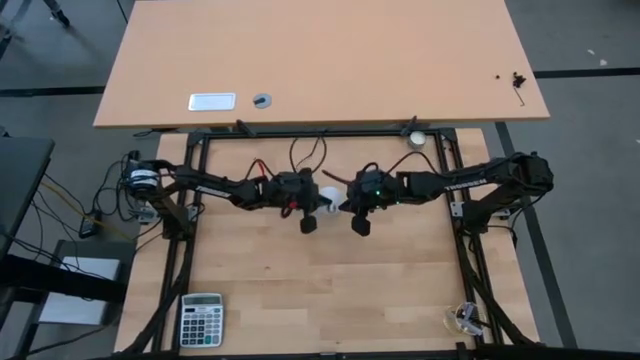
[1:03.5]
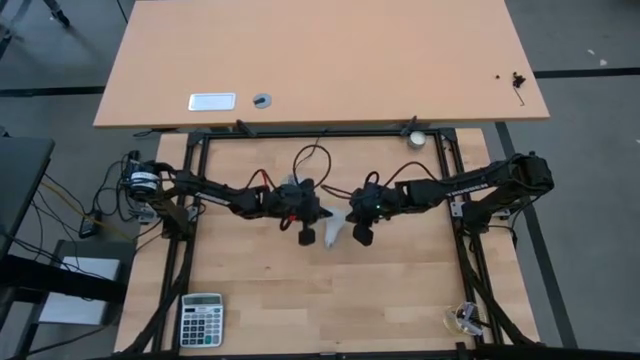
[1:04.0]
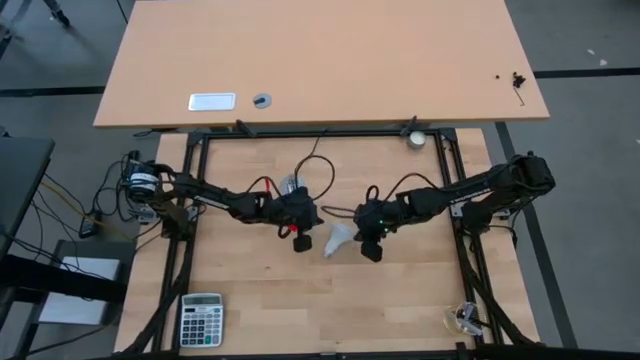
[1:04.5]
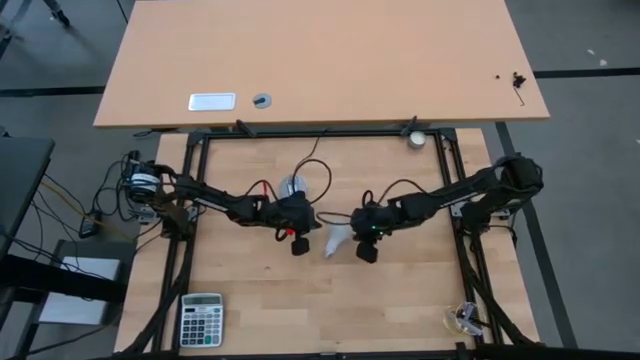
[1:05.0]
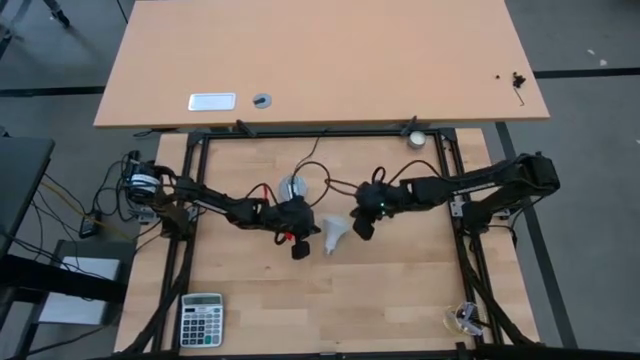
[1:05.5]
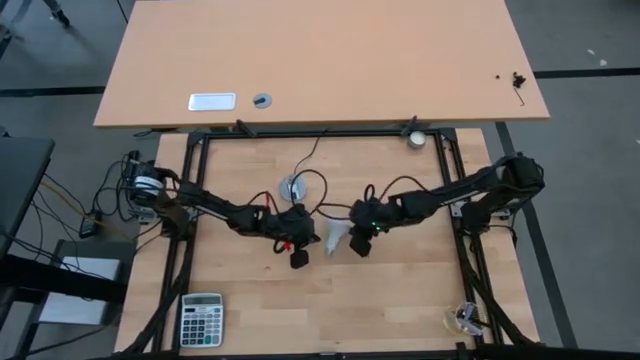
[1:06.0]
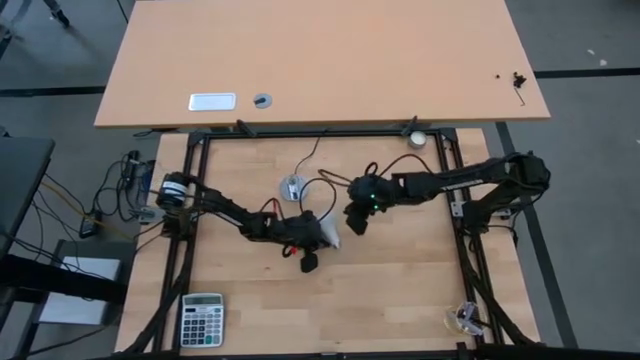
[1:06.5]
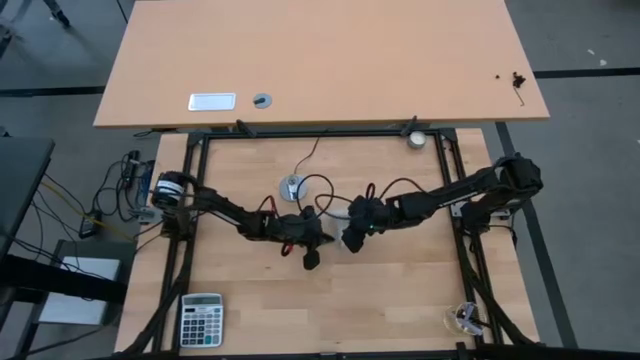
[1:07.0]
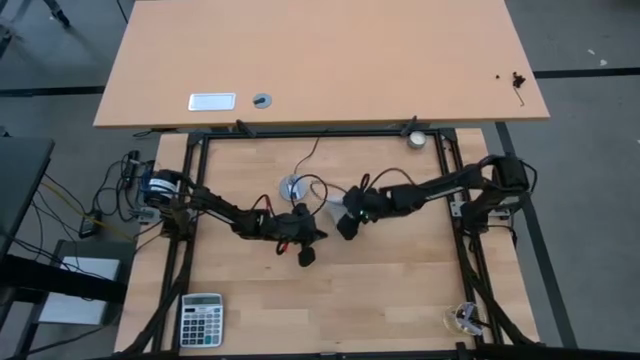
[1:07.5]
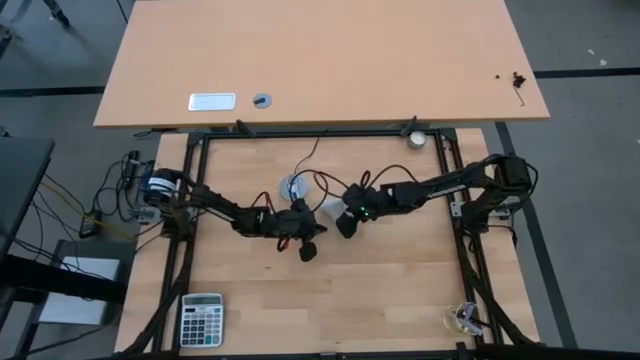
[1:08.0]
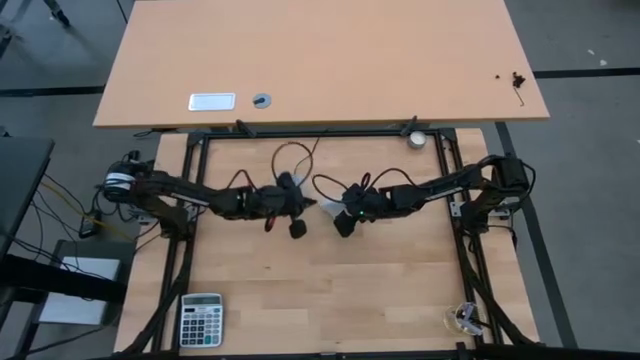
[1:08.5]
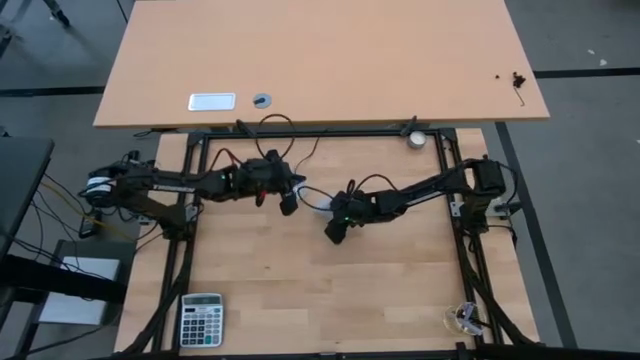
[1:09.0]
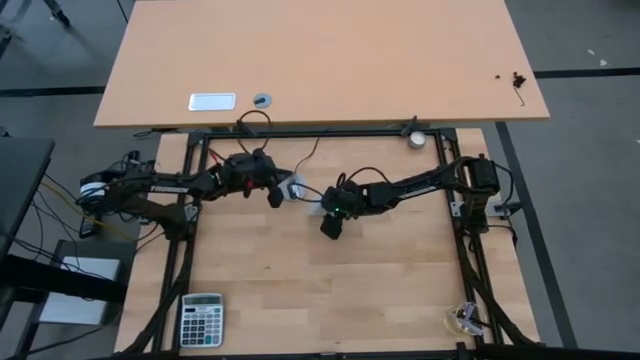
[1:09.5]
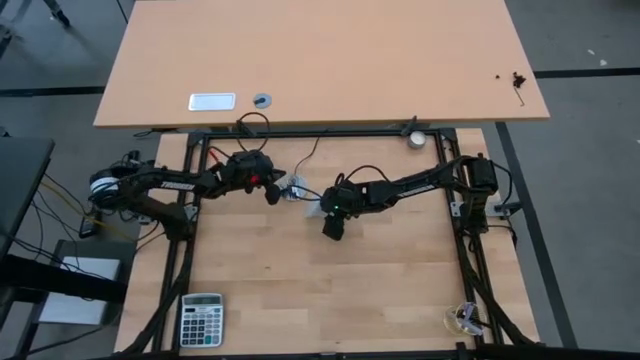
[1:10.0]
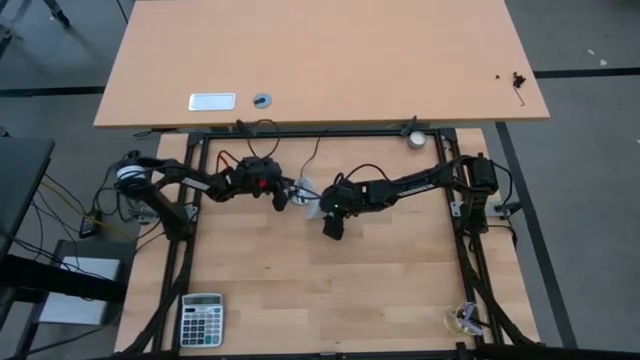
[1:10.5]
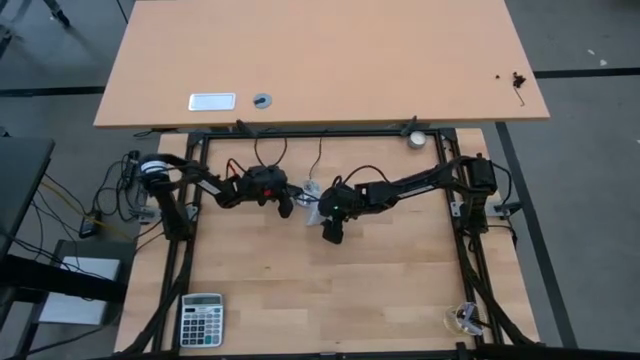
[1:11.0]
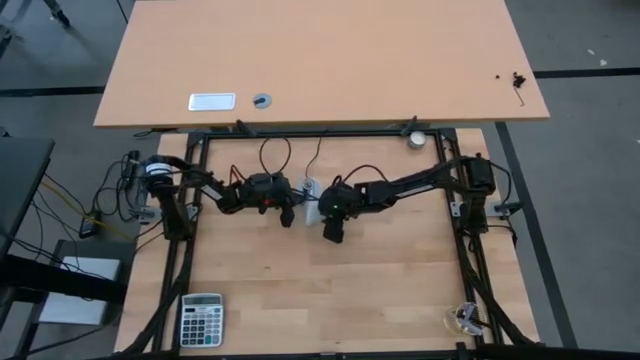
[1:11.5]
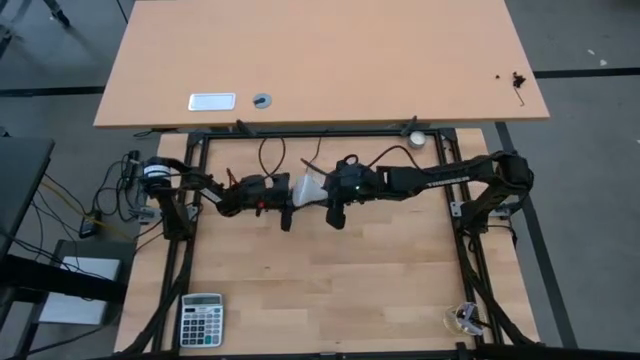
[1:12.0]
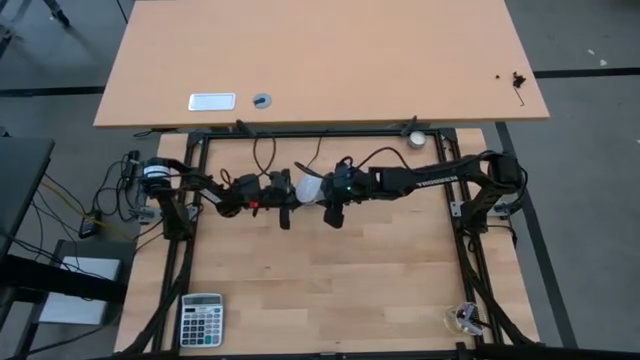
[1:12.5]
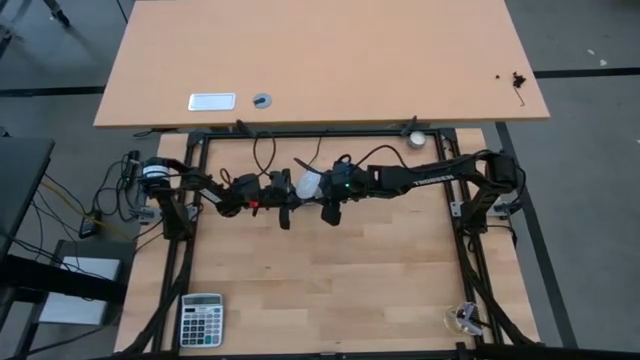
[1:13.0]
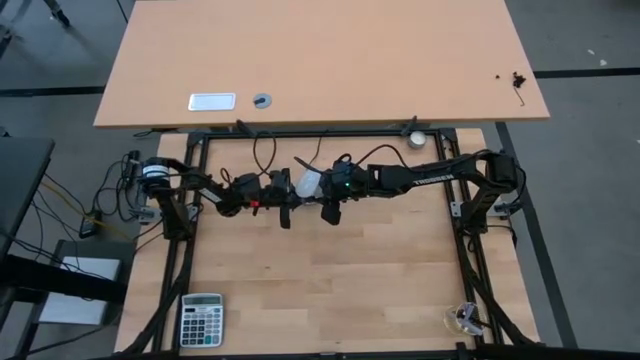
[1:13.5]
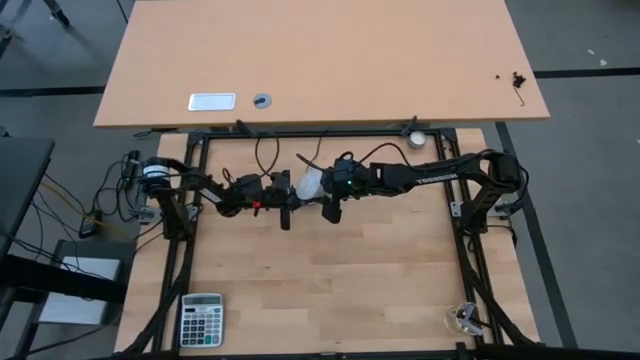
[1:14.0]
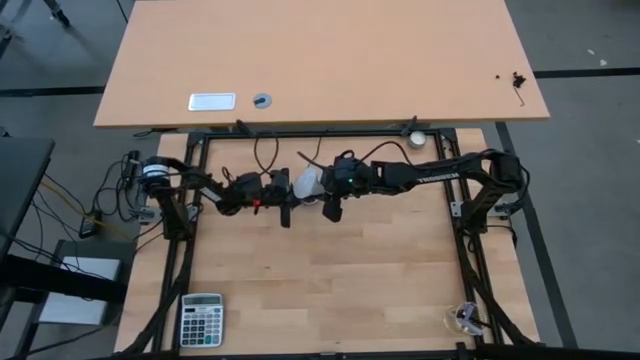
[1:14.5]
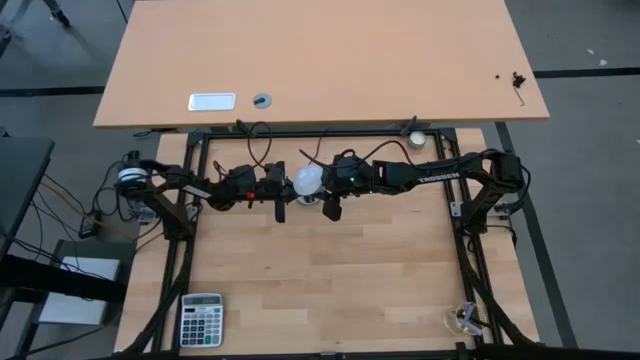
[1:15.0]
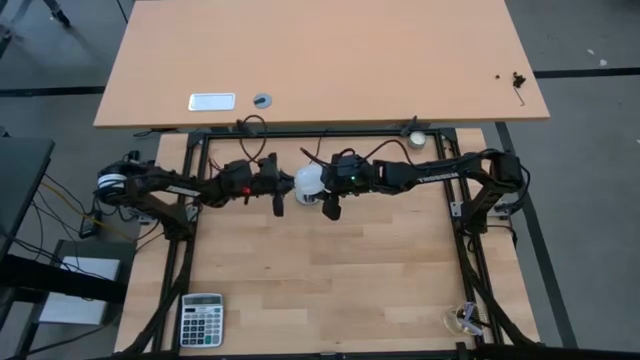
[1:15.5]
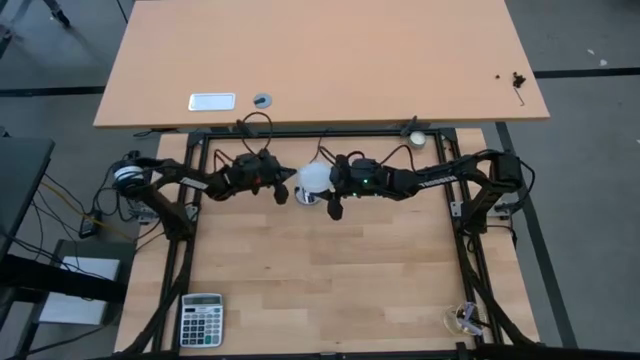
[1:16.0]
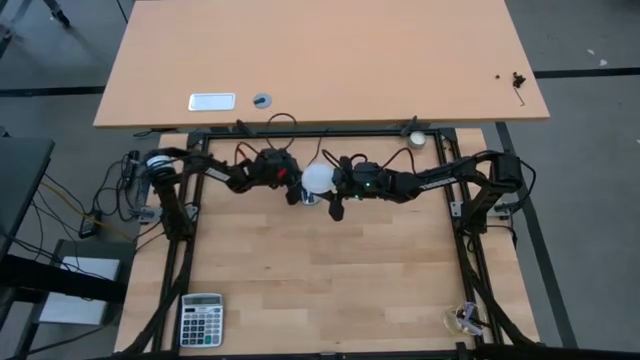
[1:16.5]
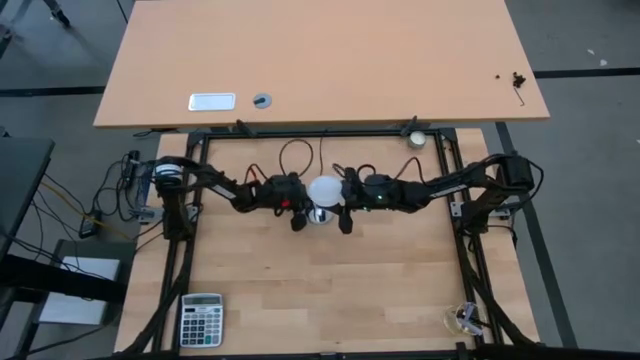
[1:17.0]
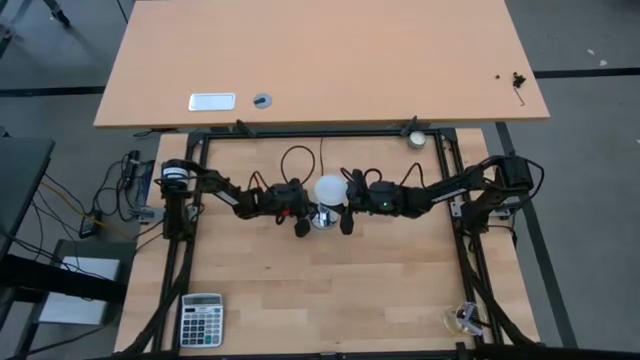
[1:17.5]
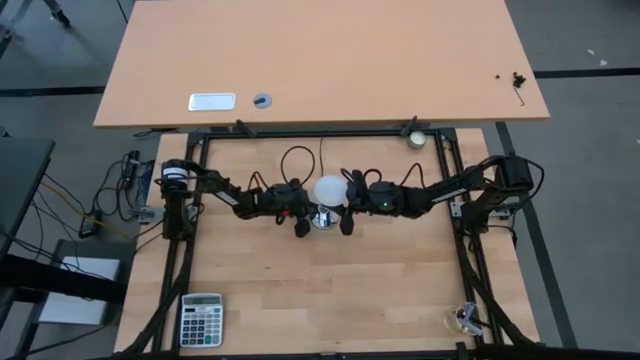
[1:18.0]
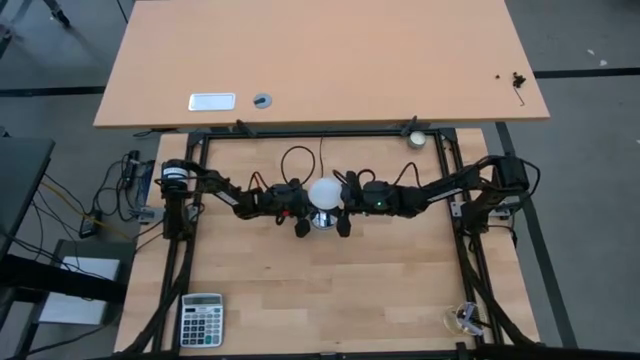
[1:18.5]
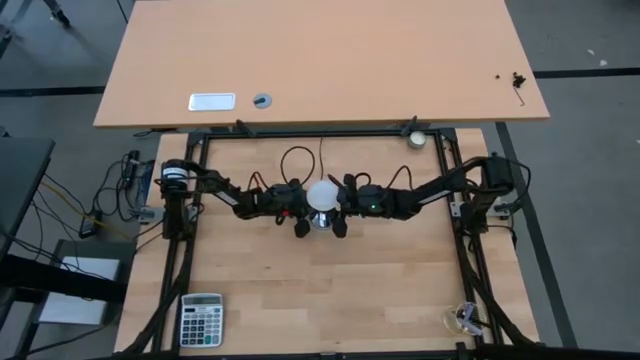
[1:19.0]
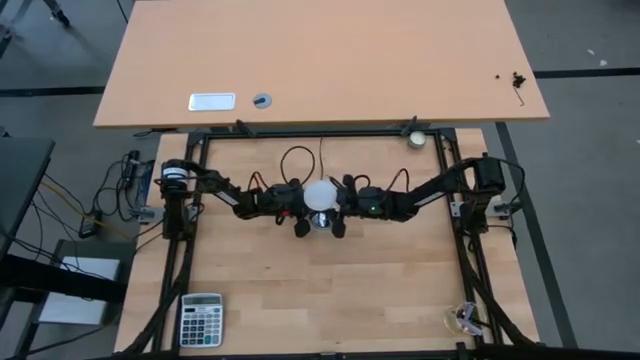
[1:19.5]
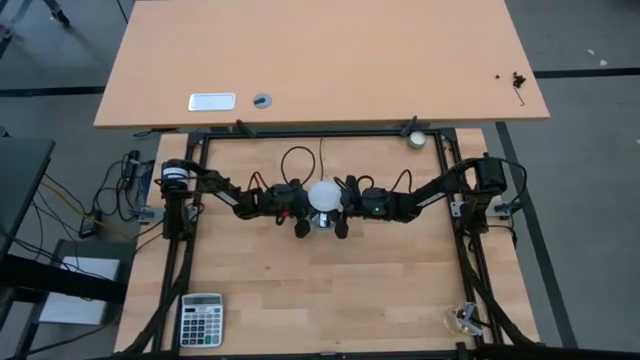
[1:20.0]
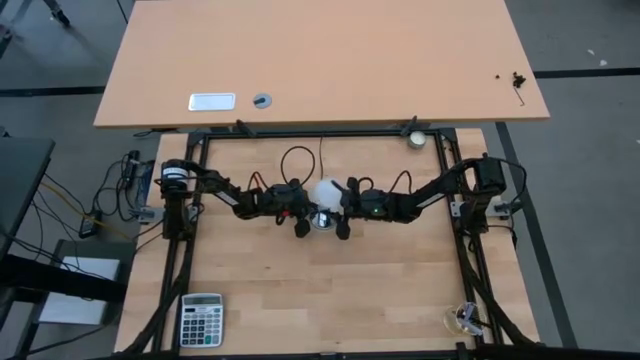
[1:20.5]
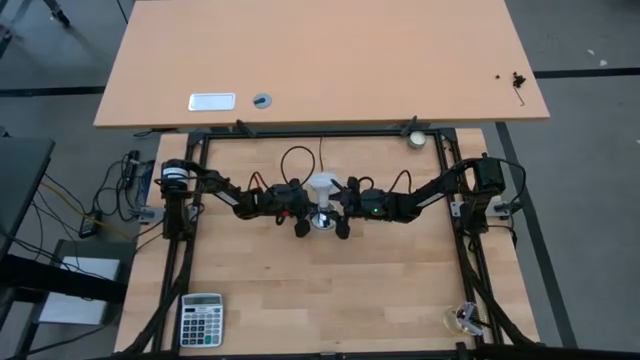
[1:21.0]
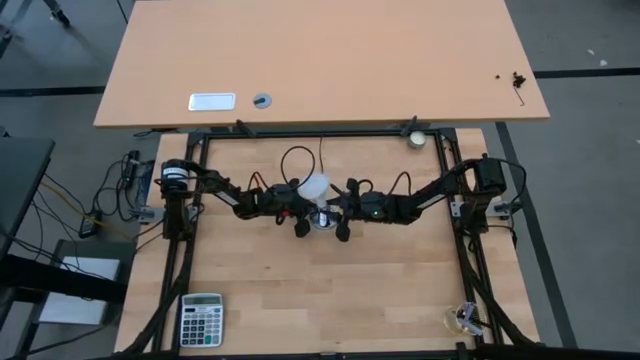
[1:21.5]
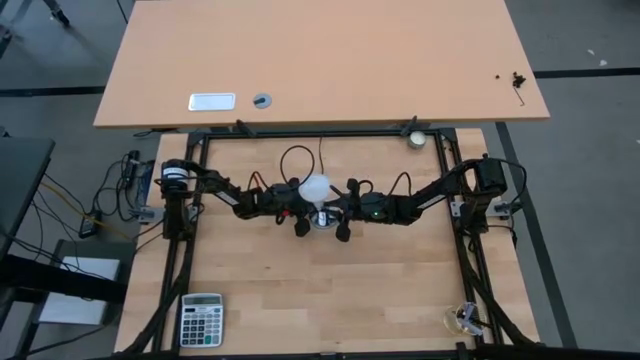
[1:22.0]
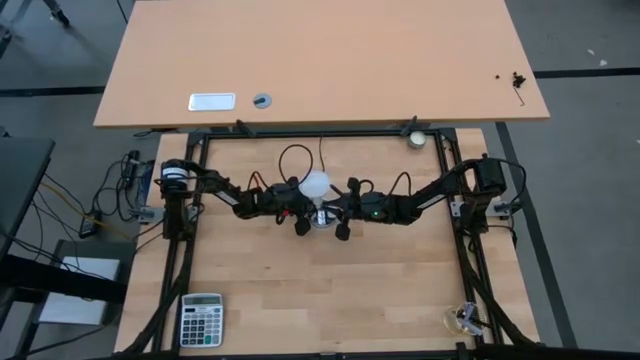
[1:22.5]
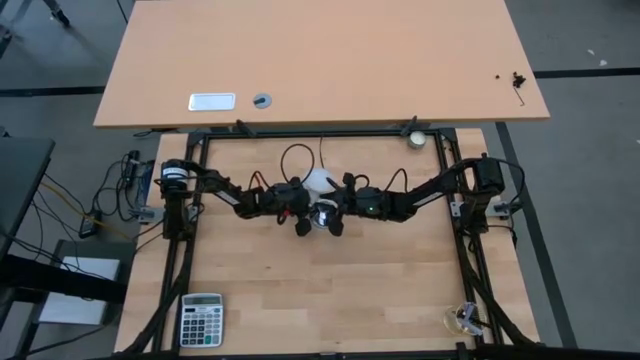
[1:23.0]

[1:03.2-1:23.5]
Task: Screw lightbulb
Insert the lightbulb into the silver lamp socket

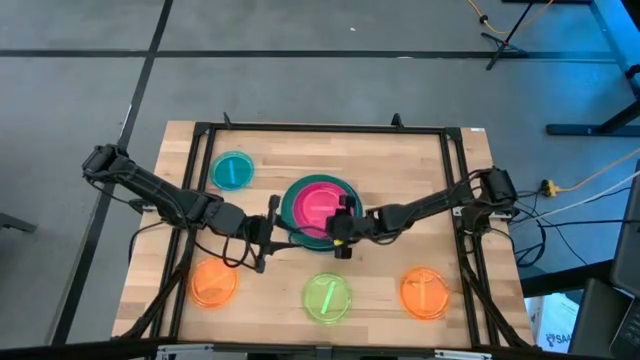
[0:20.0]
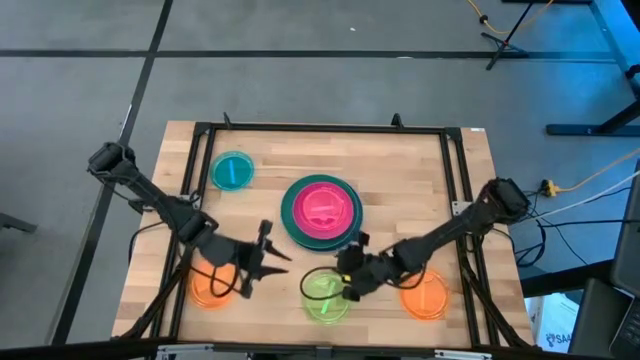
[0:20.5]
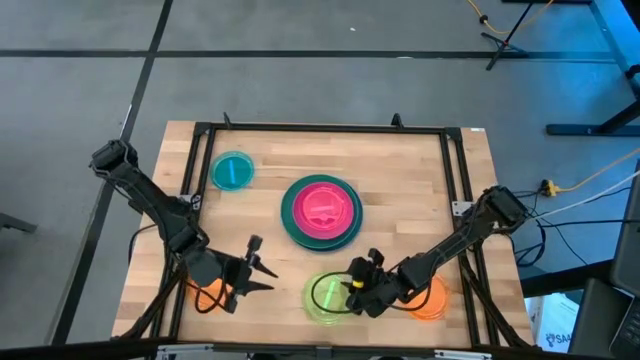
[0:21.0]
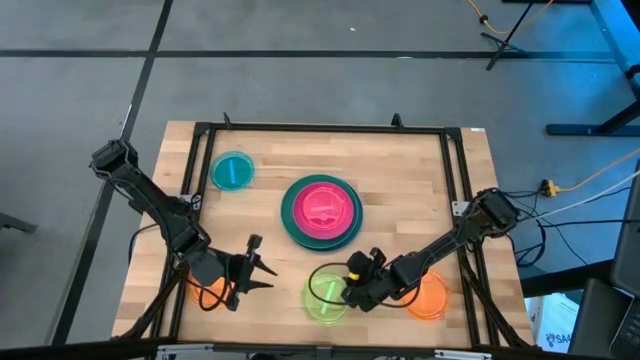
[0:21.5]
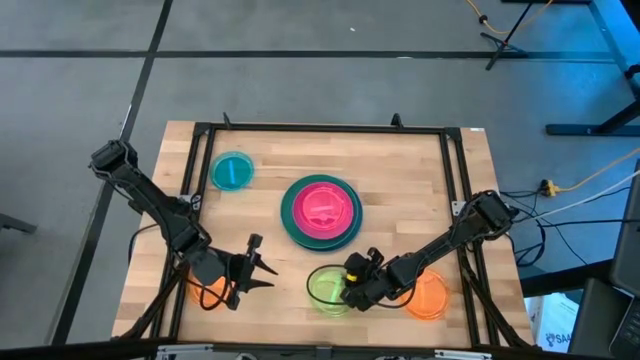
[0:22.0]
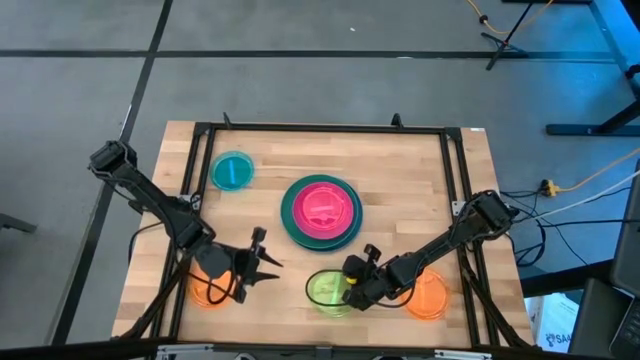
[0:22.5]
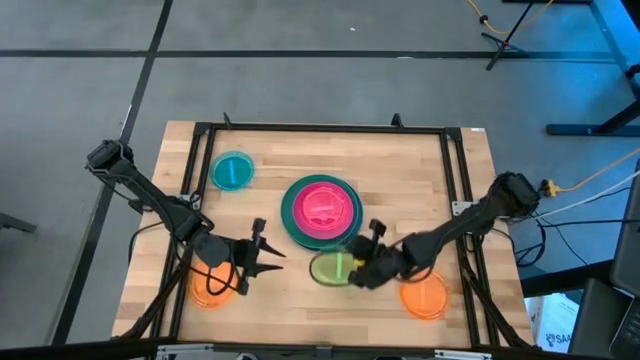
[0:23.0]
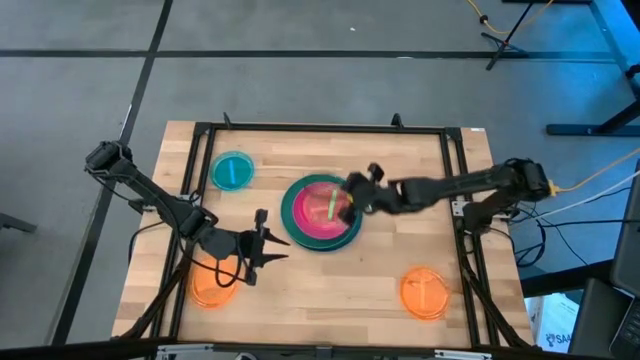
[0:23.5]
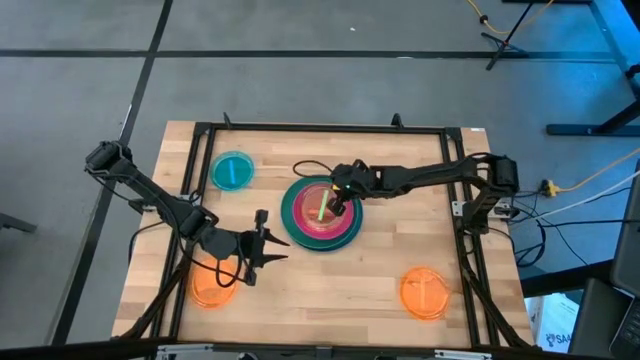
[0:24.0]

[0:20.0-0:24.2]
Task: Stack plastic plates
Stack the transparent green plate on top of the transparent pink plate
